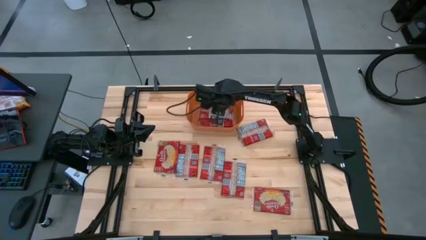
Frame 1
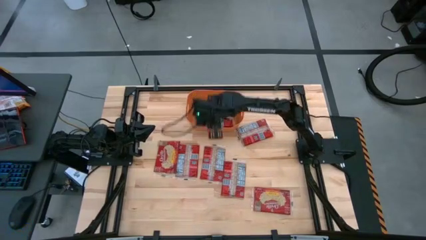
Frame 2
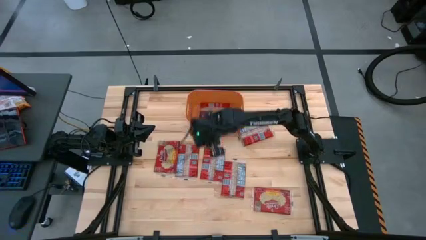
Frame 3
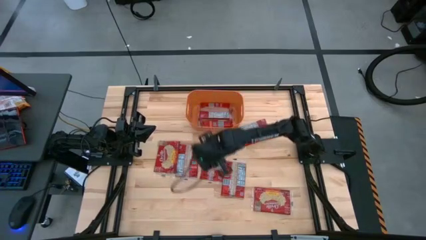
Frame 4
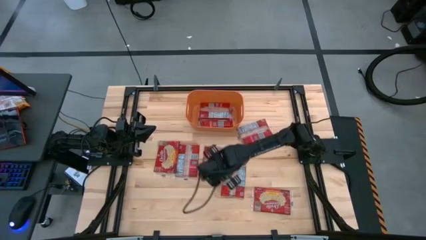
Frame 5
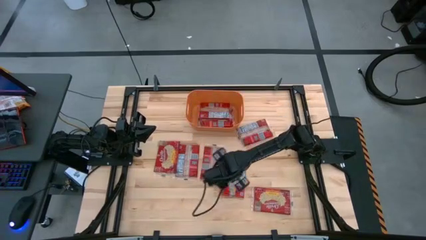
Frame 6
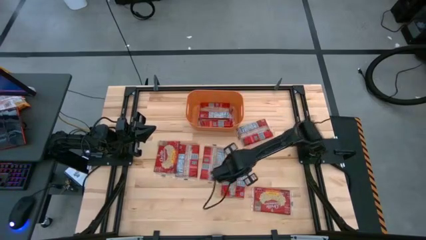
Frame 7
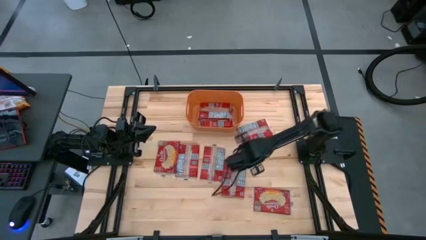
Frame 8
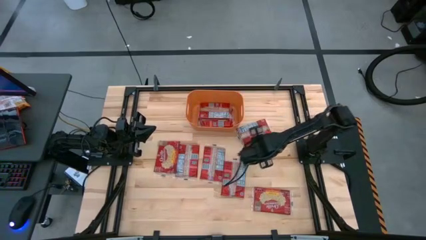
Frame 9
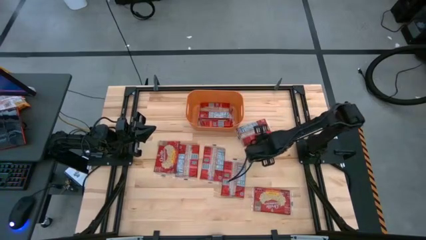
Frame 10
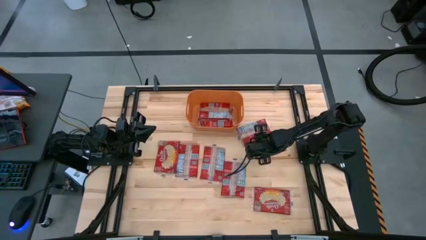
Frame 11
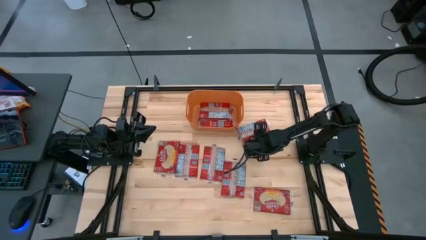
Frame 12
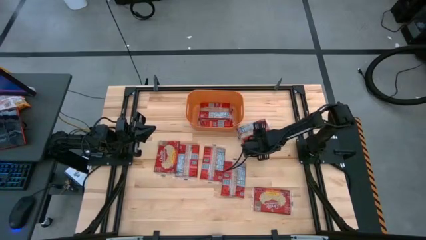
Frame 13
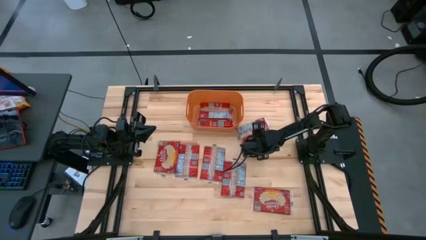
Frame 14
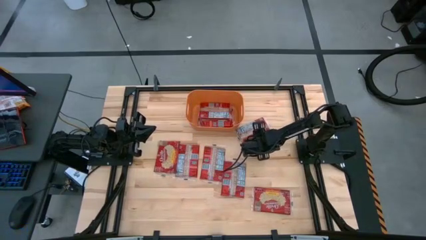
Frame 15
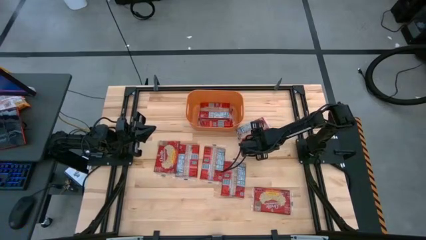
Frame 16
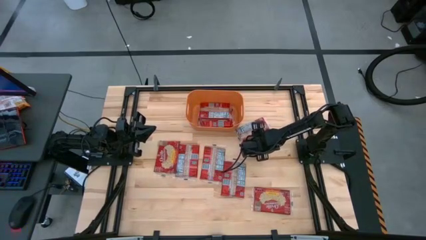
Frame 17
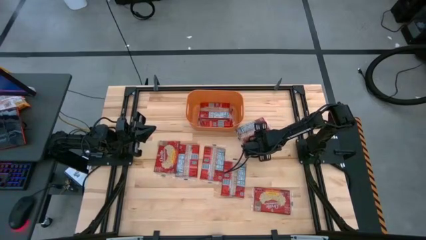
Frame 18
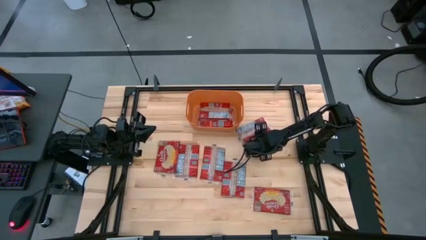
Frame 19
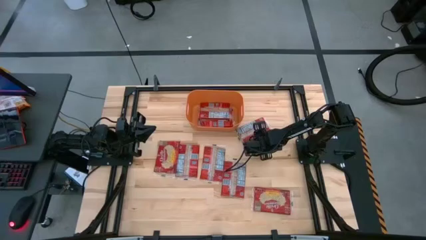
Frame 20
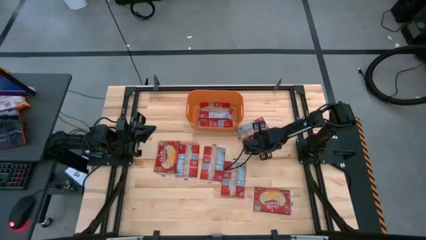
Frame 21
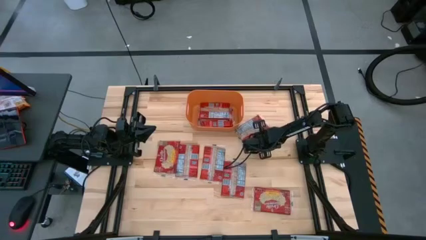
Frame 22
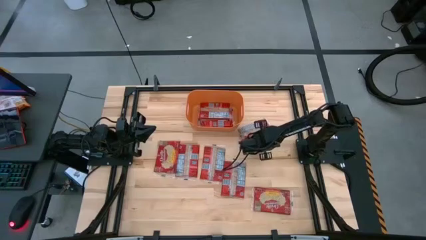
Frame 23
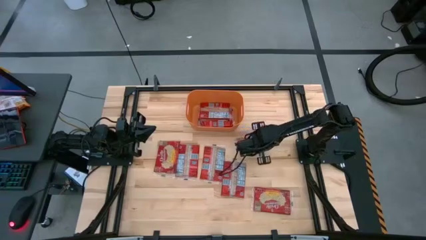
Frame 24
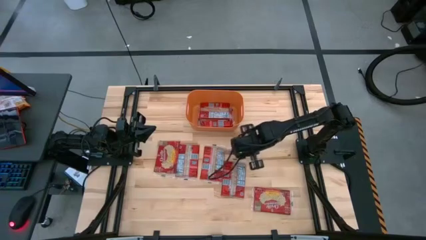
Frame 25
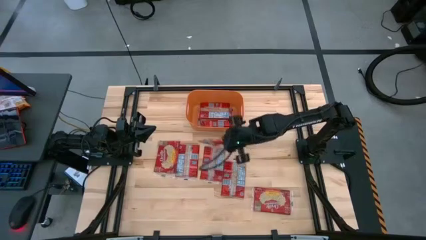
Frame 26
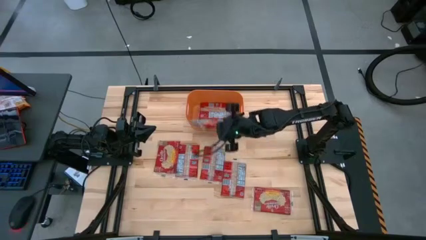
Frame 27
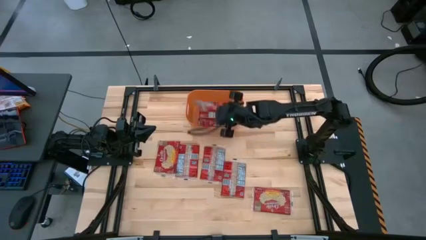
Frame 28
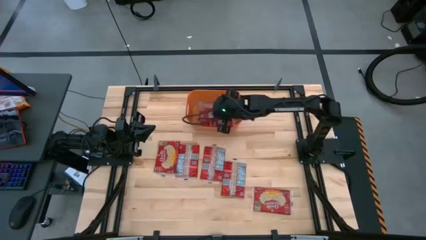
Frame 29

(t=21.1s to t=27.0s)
Task: Sort popcorn bags into baskets
Put the red popcorn bag into the orange bin

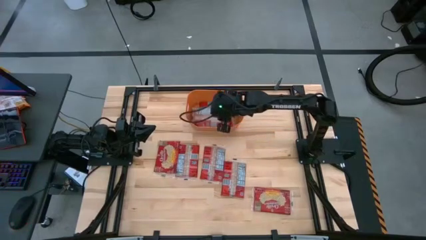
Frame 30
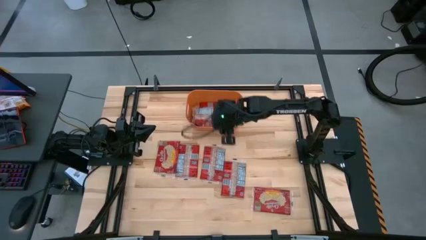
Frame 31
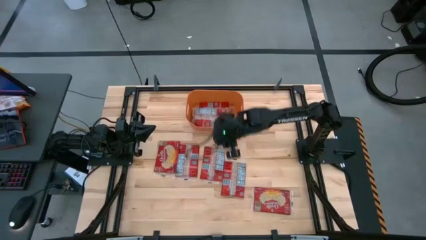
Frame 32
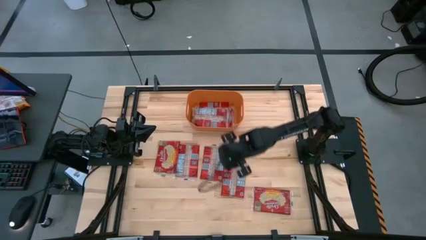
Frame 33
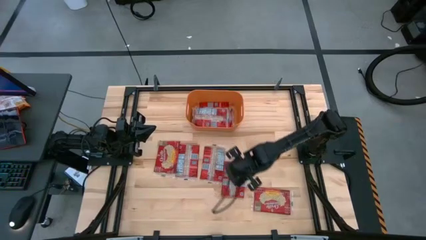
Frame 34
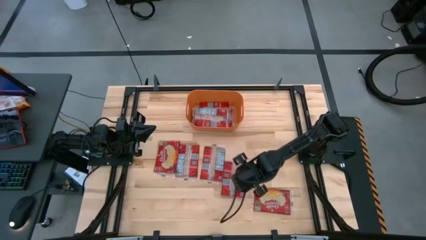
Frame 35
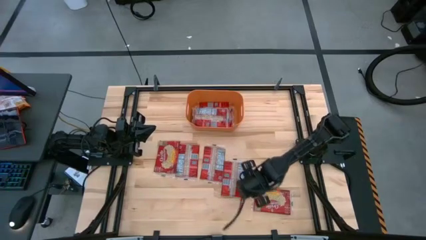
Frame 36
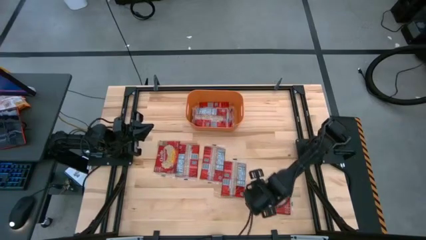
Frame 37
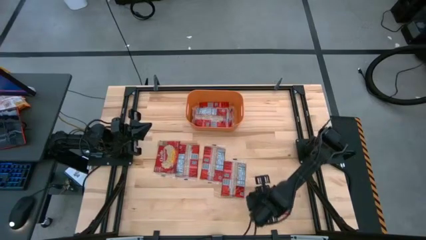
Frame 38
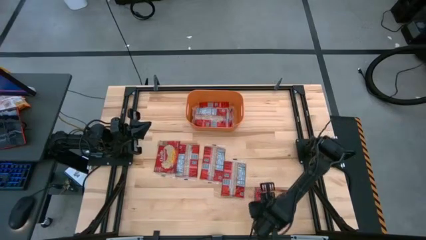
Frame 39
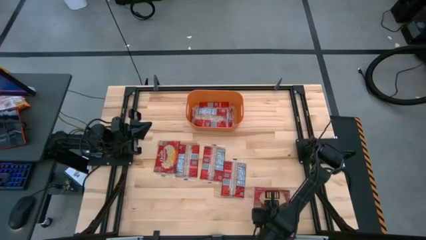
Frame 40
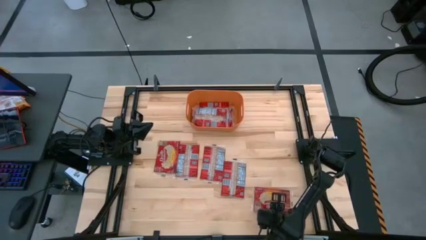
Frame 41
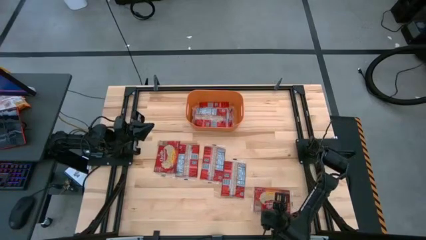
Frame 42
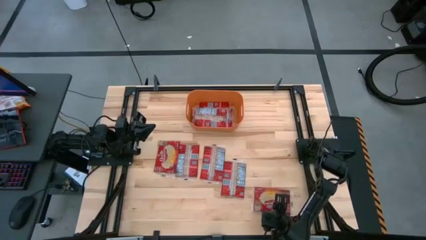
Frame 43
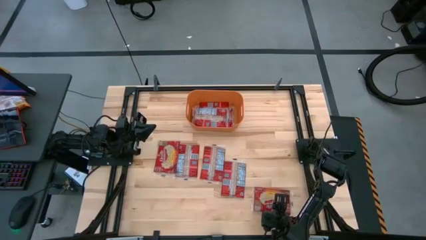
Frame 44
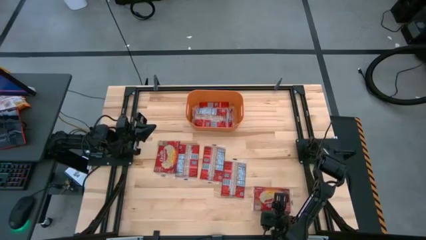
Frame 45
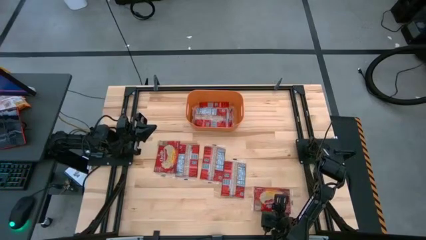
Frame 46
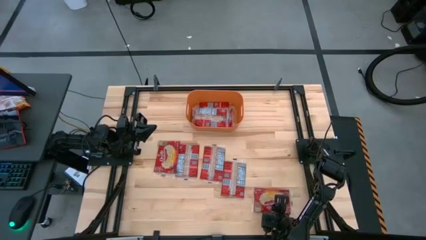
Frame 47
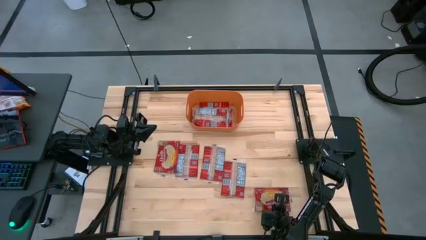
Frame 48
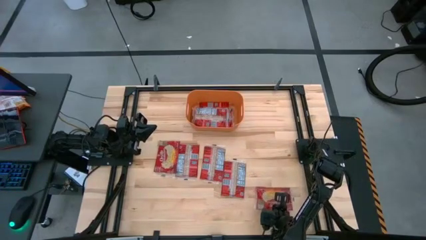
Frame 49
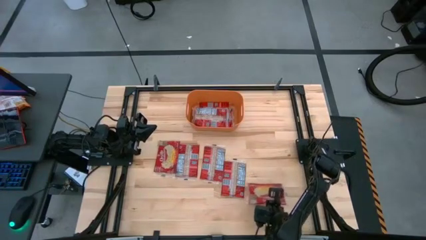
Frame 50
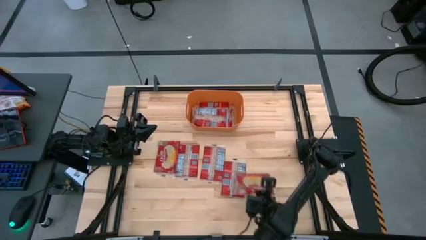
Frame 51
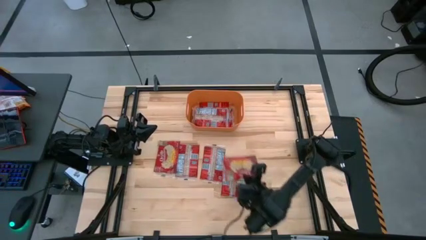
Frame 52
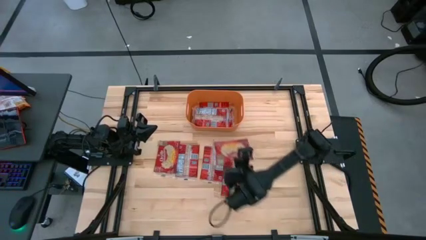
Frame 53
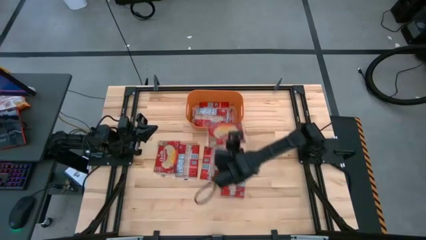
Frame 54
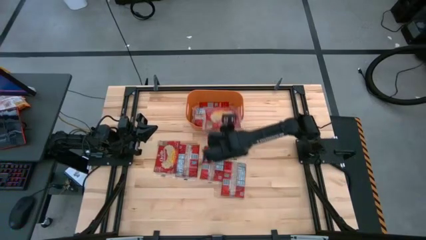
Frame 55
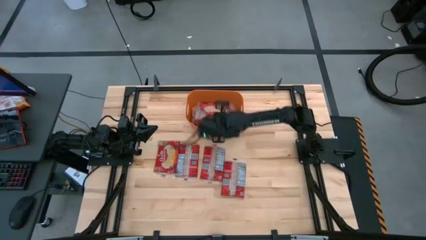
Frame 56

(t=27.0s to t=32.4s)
Put the red popcorn bag into the orange bin

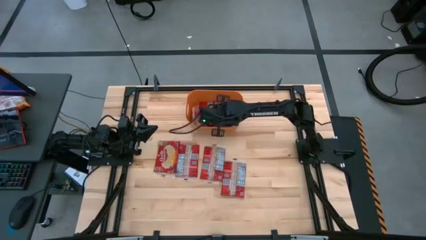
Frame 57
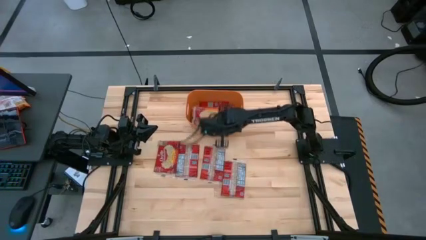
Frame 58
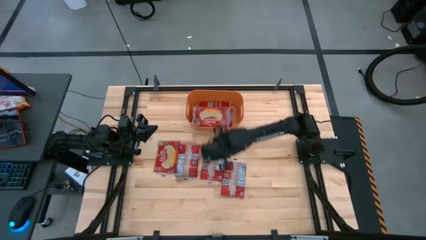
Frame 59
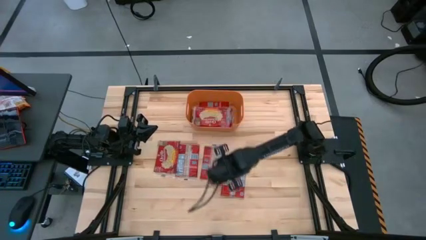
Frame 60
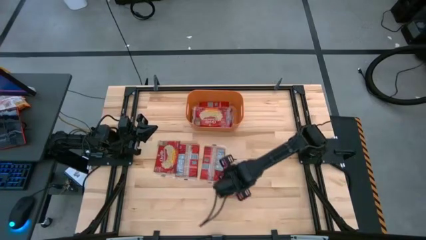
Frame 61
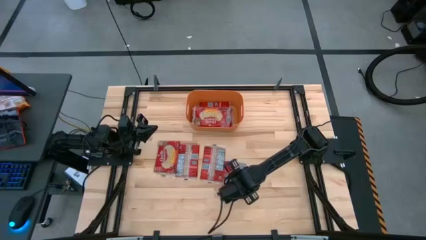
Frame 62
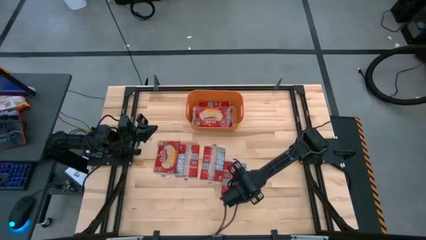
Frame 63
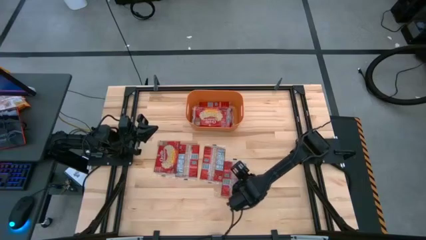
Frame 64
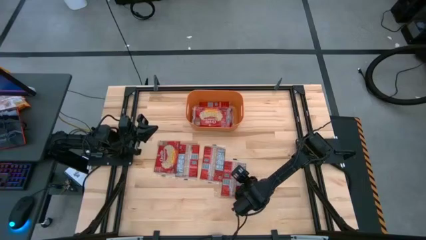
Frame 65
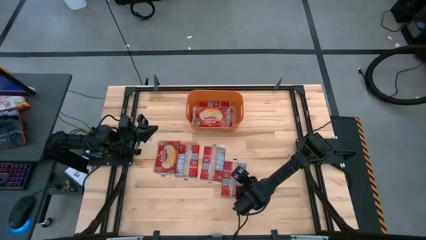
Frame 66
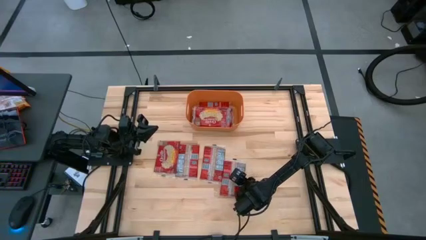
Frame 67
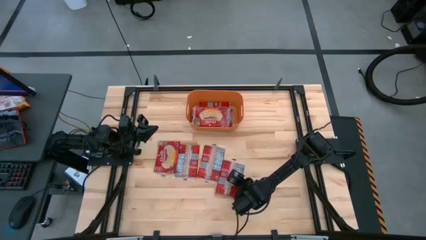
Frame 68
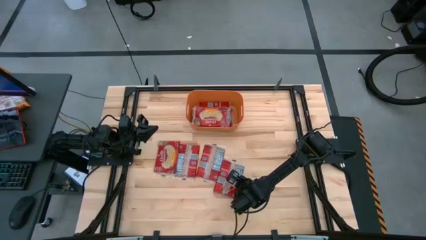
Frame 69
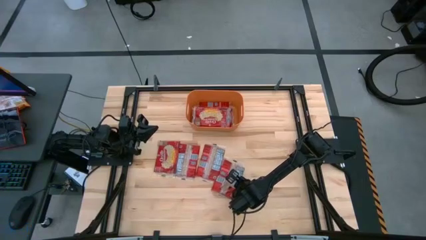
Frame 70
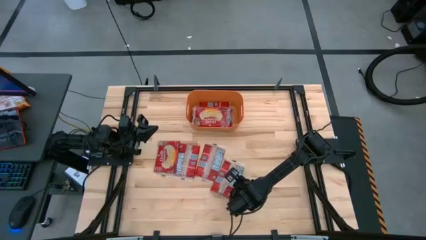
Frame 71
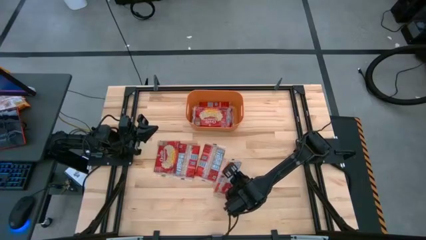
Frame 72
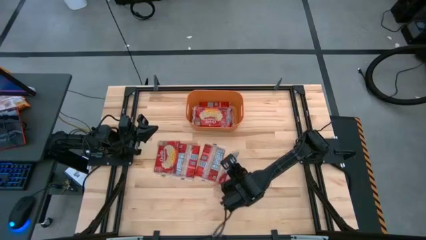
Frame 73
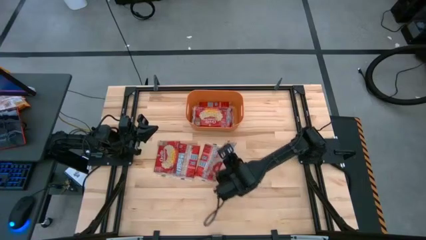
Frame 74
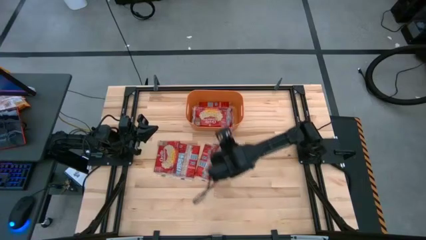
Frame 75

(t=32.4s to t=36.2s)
Put the red popcorn bag into the orange bin

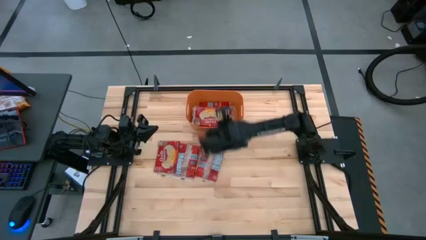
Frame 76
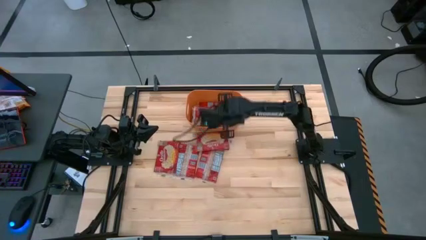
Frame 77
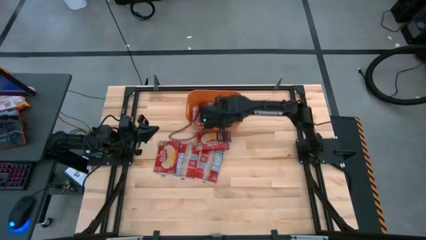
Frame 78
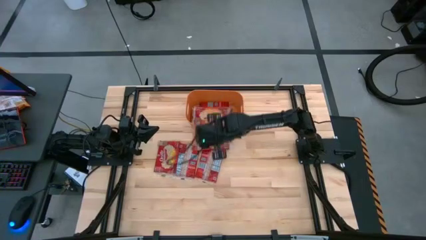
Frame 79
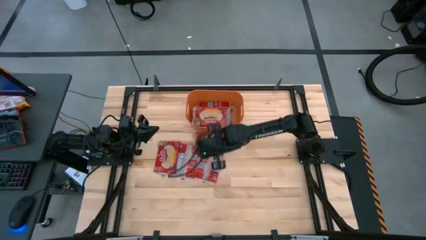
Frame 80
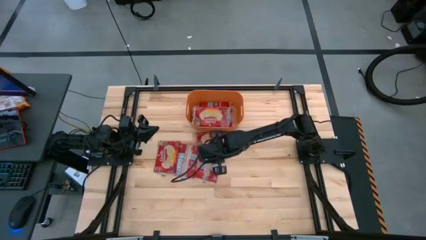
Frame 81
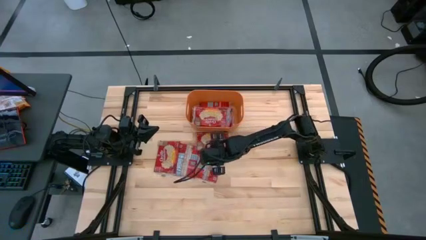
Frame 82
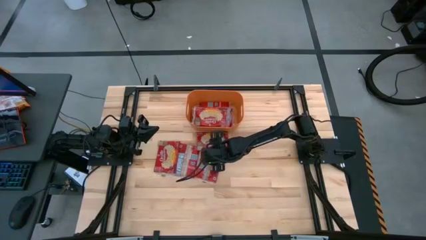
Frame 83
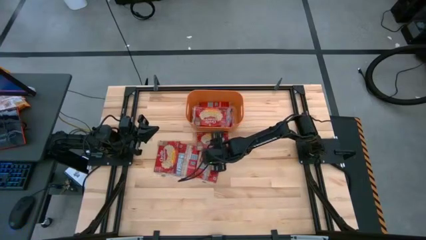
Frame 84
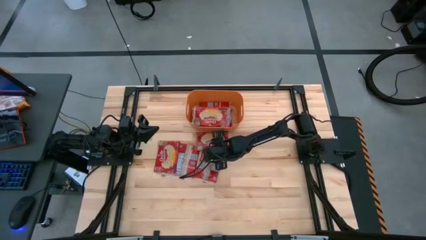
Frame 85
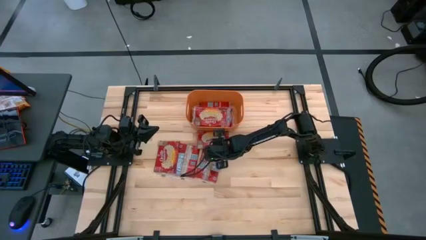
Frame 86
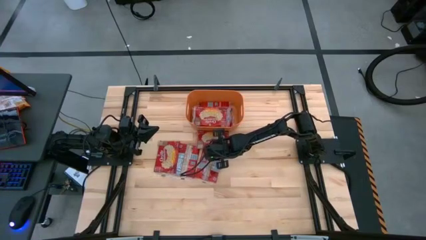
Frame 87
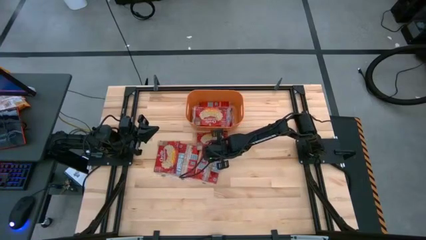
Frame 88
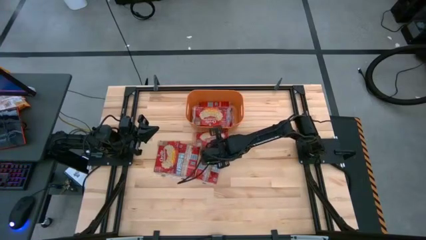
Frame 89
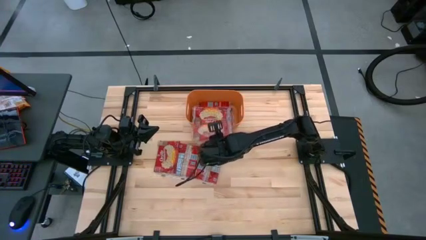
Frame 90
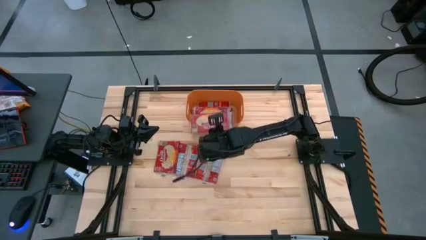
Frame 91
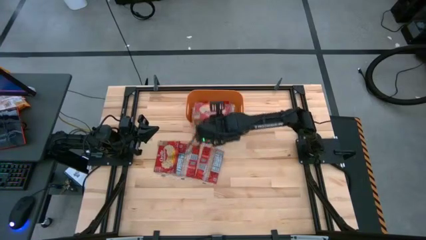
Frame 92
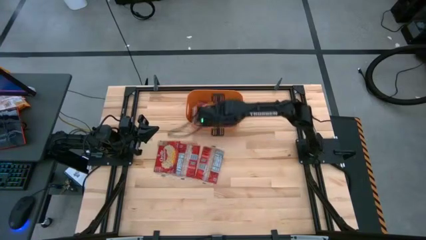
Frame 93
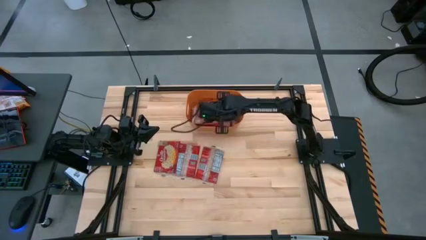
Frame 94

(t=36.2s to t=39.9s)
Put the red popcorn bag into the orange bin
